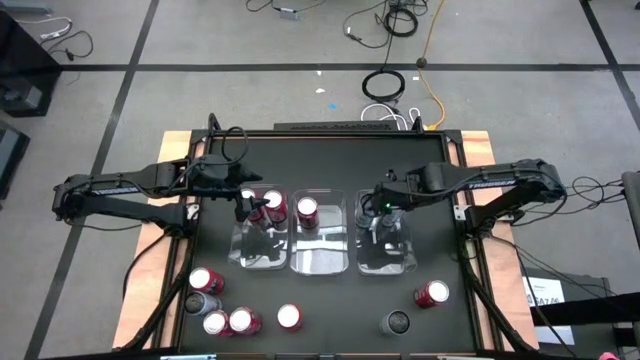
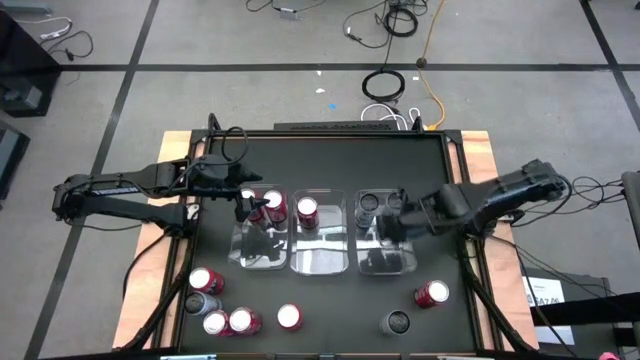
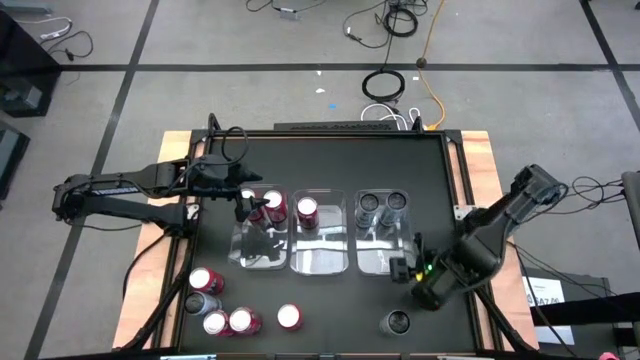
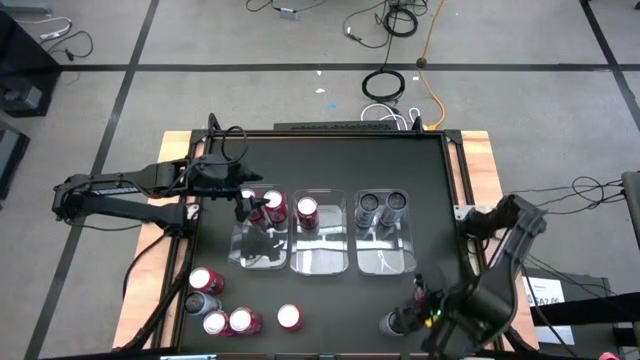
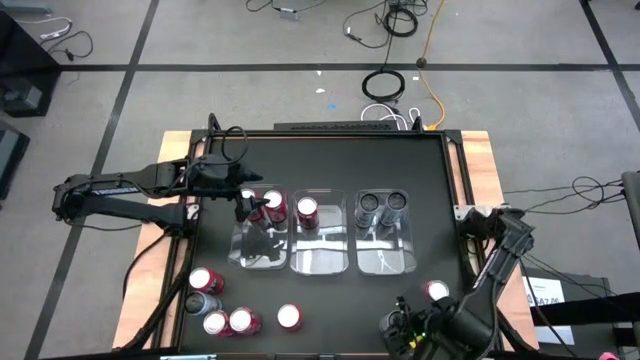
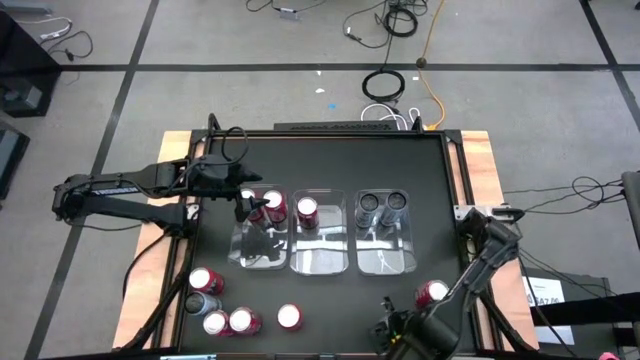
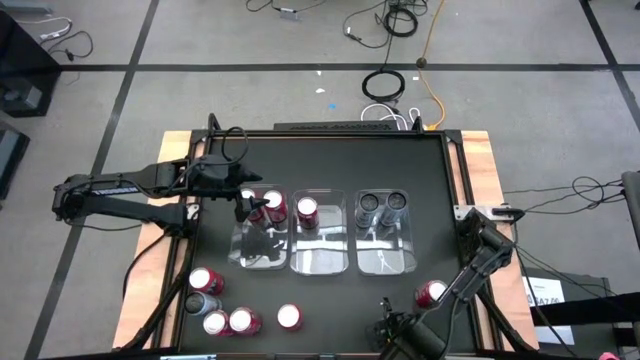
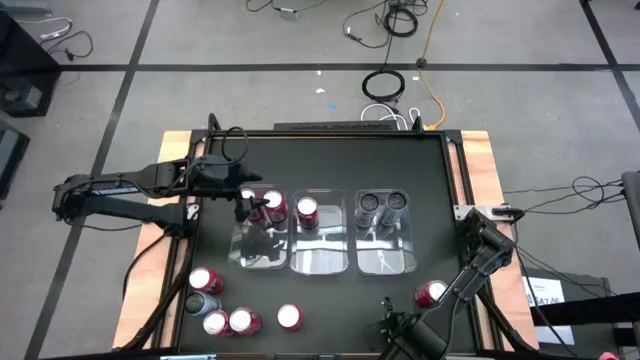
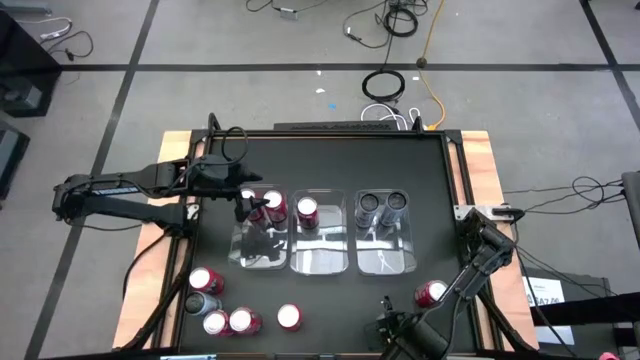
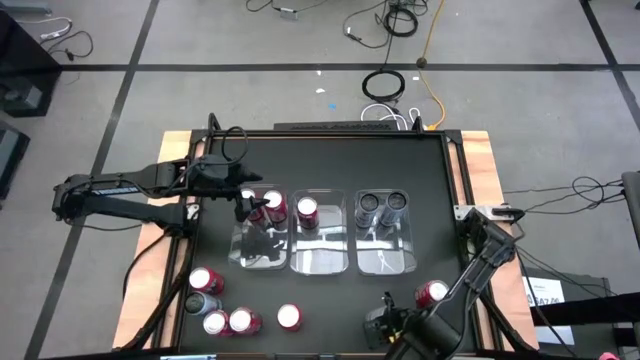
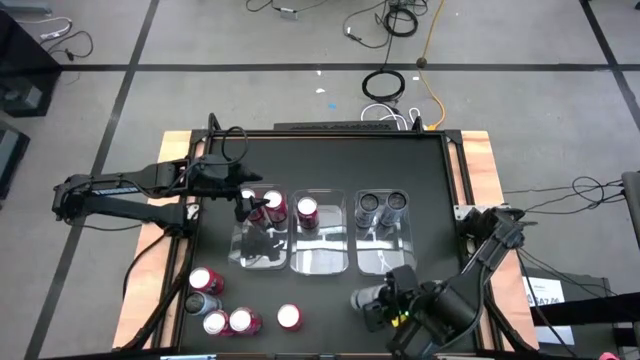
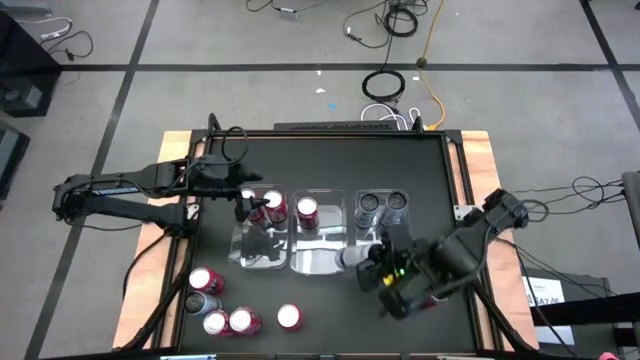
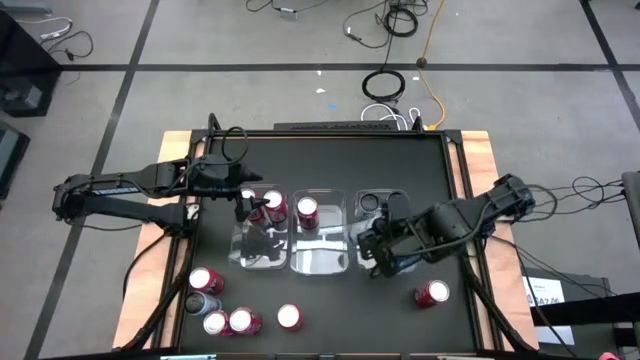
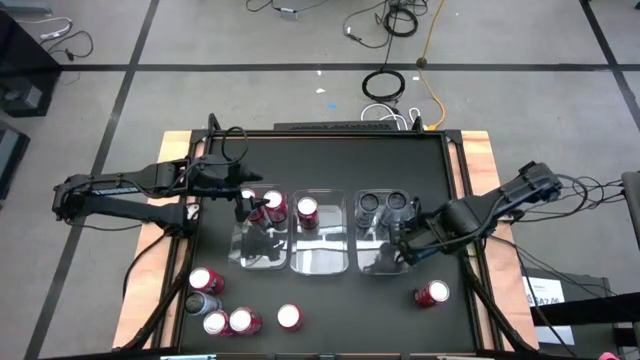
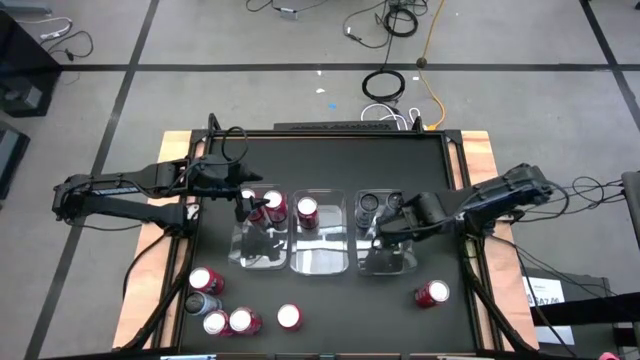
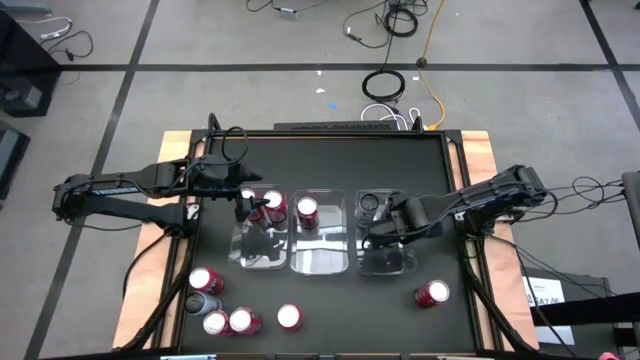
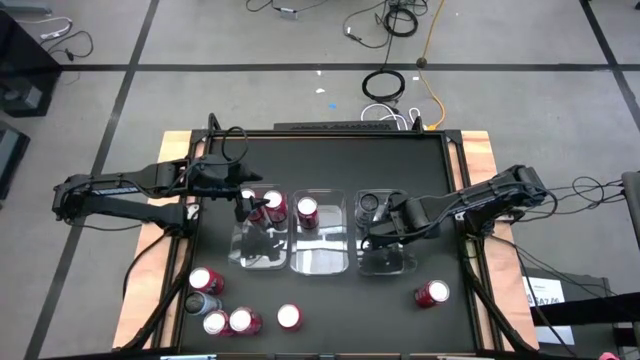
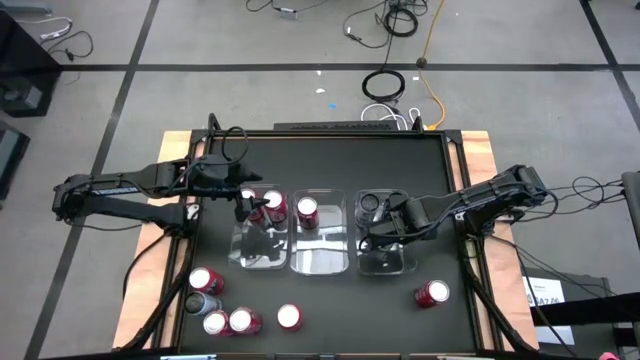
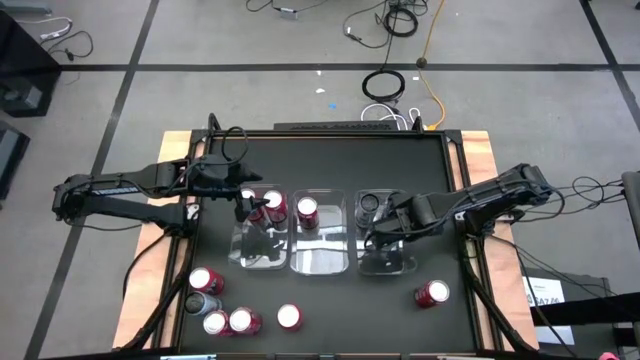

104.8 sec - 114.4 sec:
Task: Sort soda cans
Put the right white blue soda can into the right transparent bin

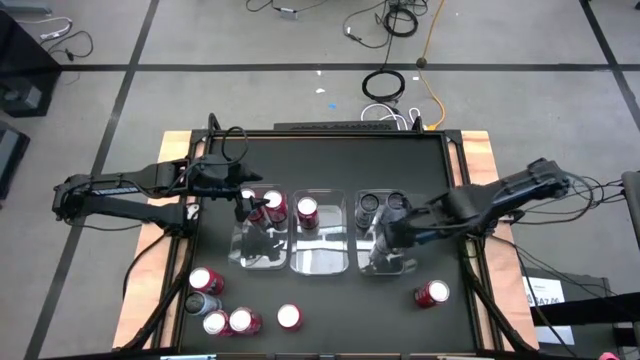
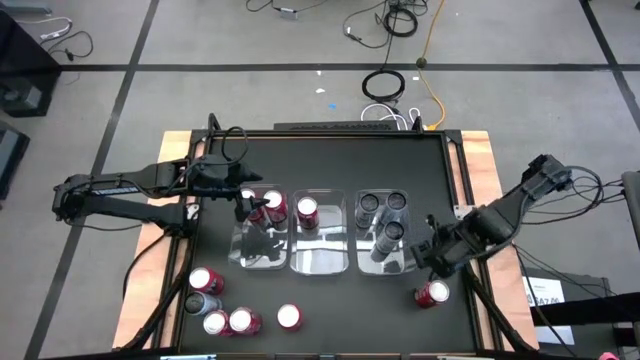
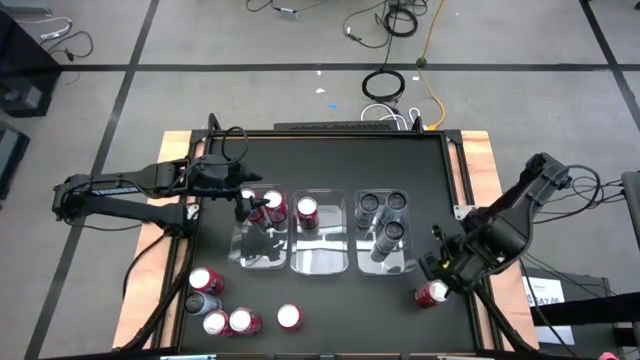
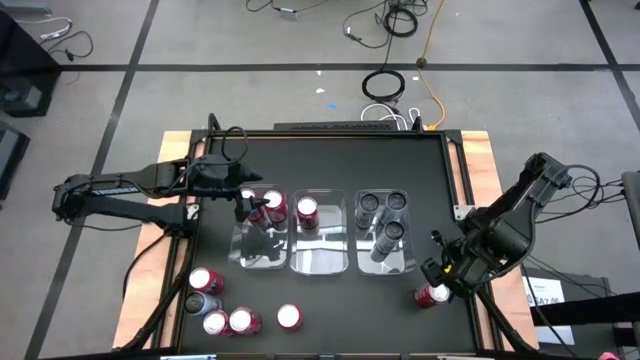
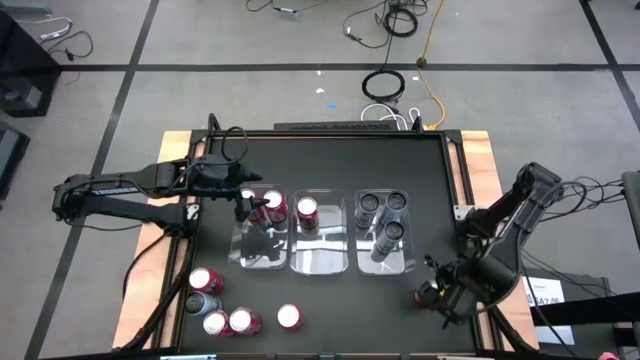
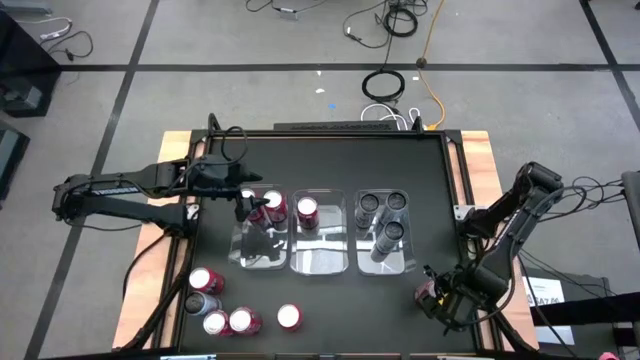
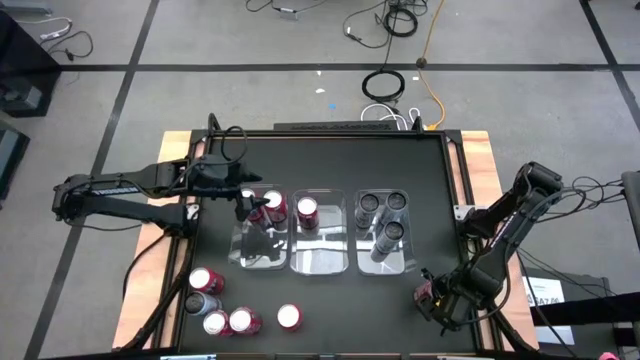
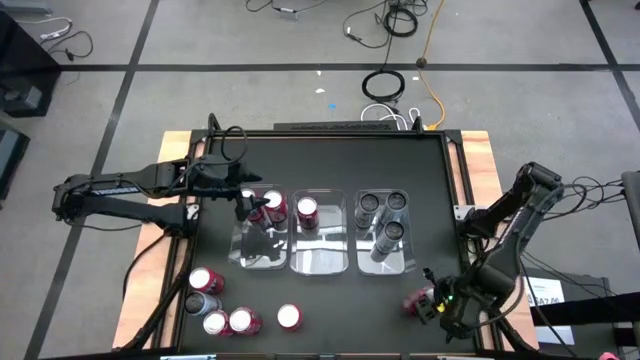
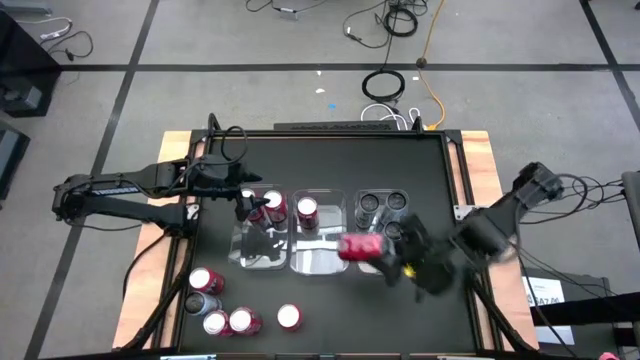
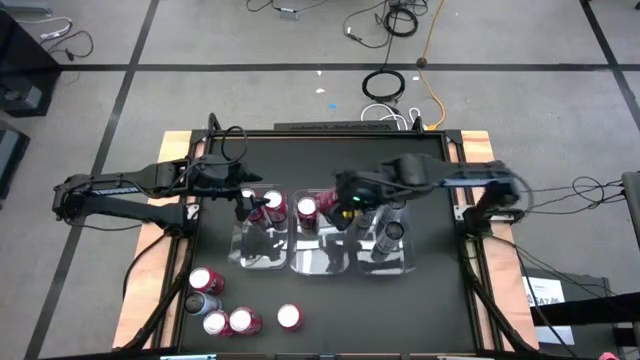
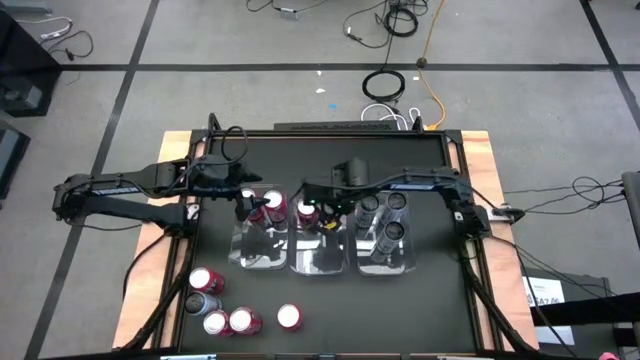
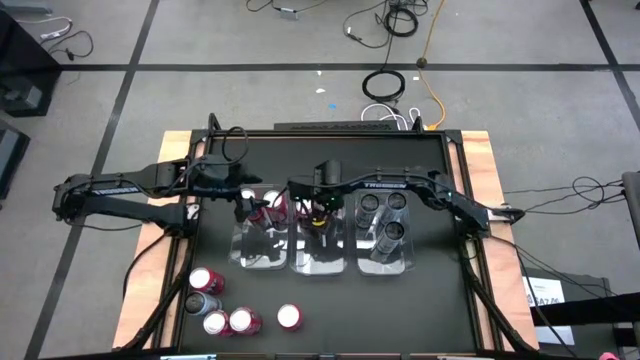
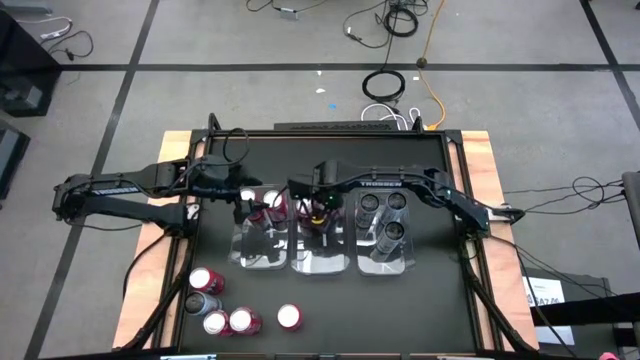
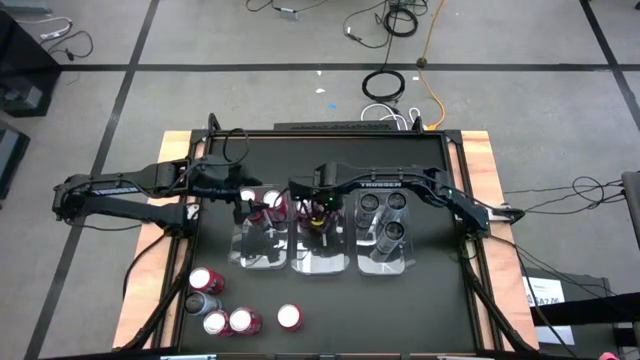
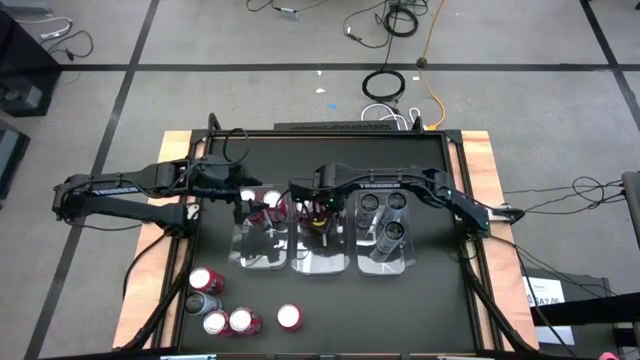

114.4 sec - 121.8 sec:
Put the right red white soda can into the middle transparent bin

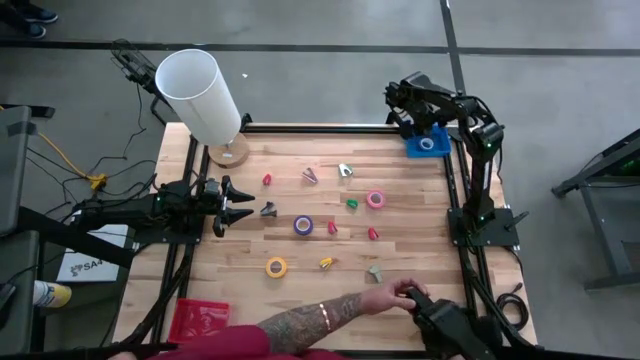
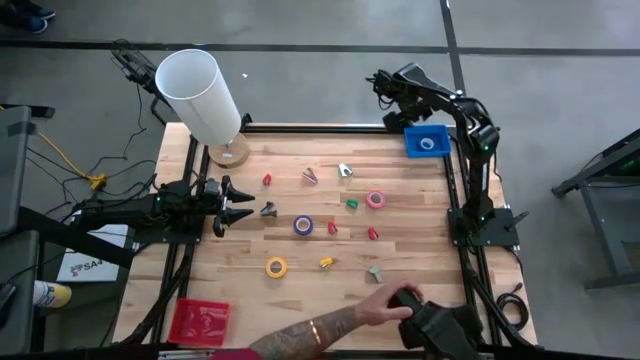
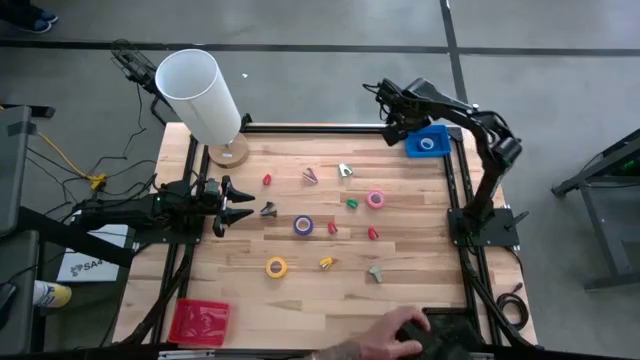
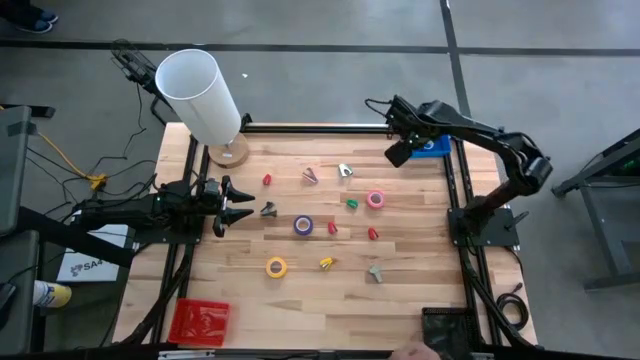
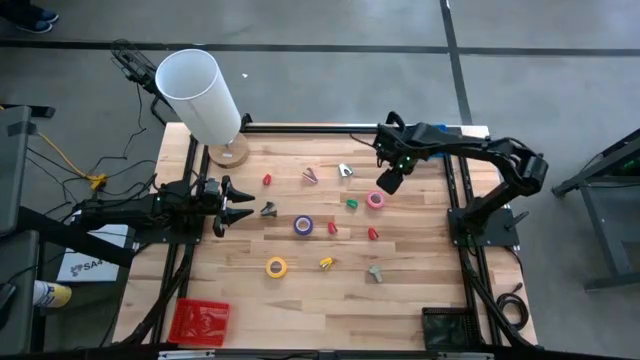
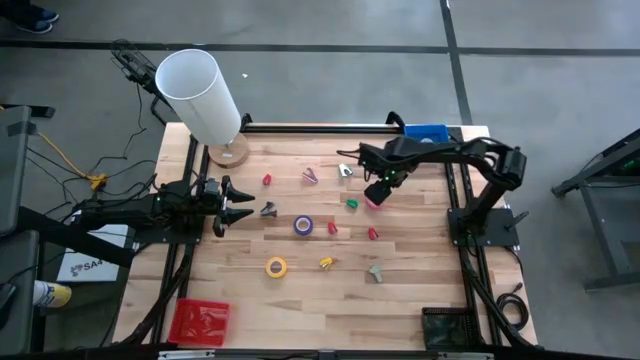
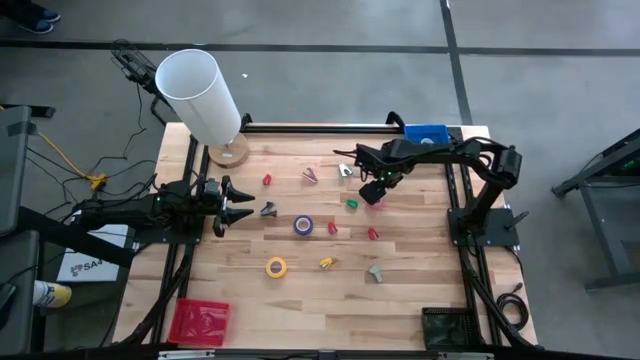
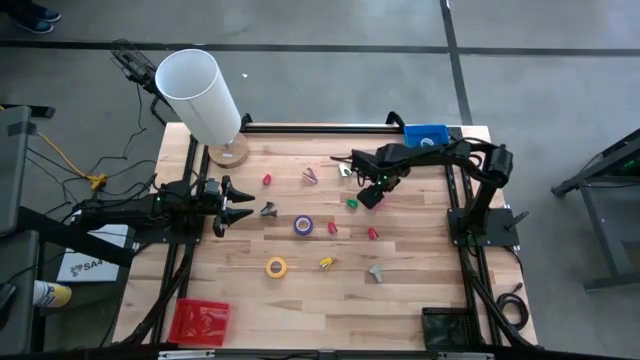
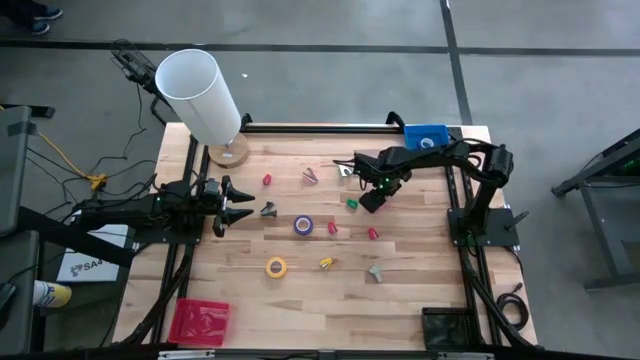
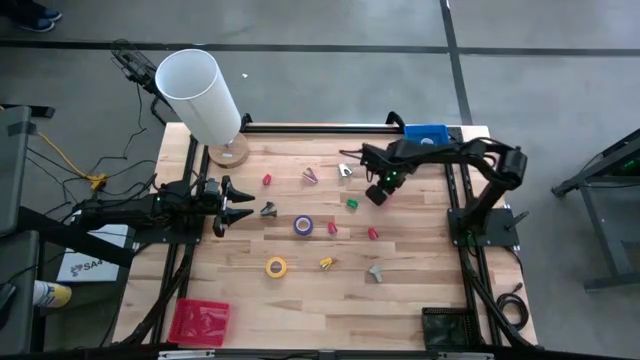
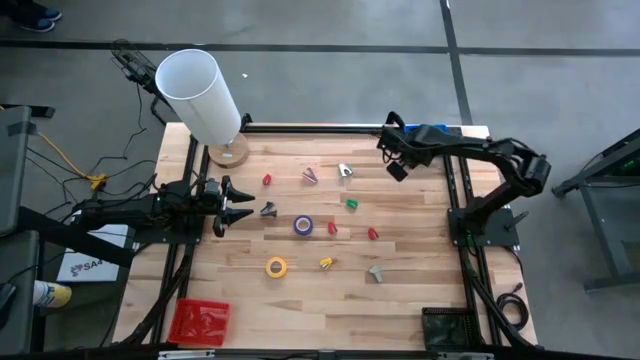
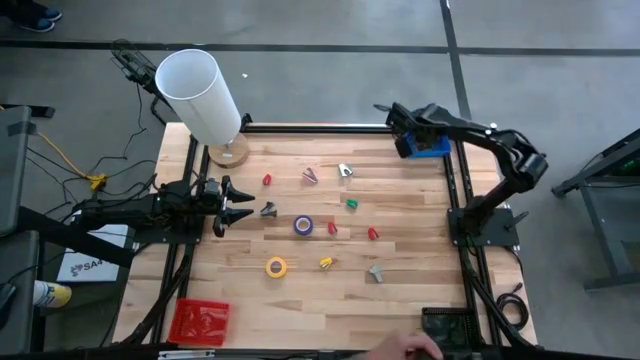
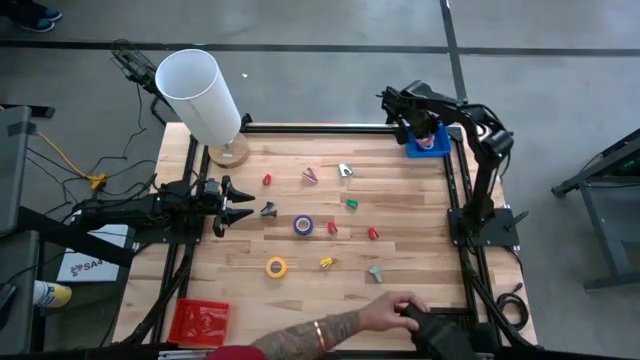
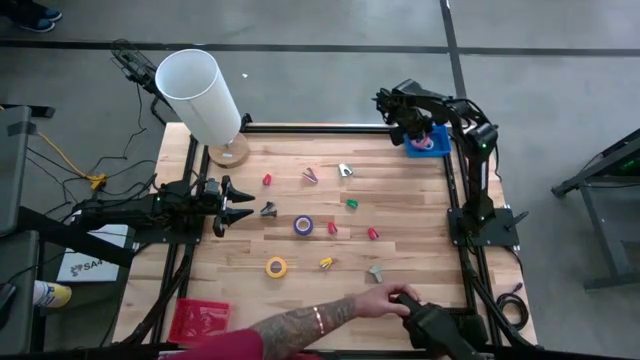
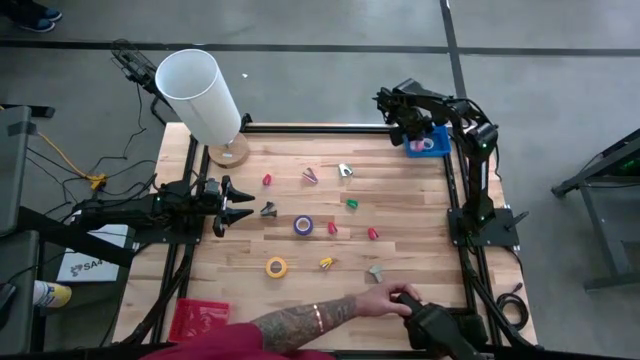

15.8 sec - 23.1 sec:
Task: Pick and place Stapler, Stapler remover, tape
Put the pink tape into the blue bin
